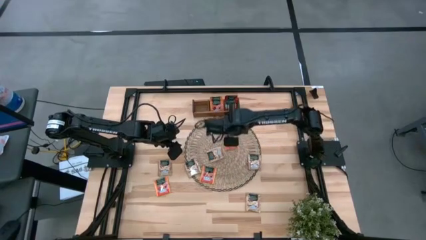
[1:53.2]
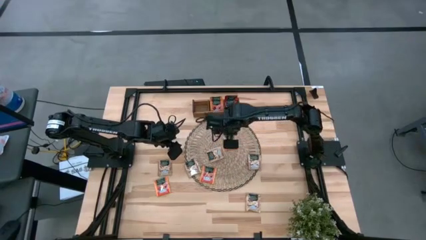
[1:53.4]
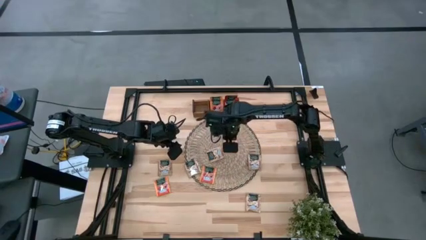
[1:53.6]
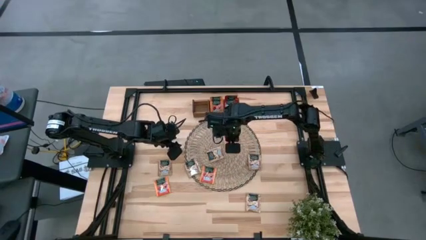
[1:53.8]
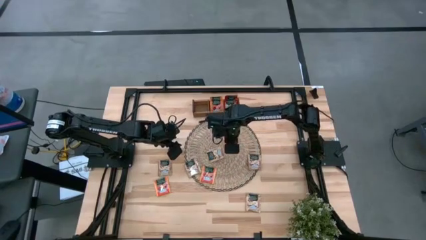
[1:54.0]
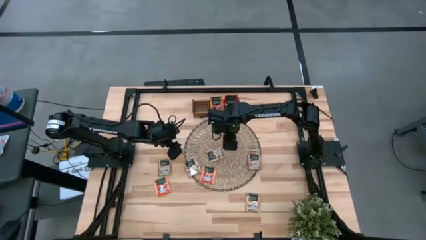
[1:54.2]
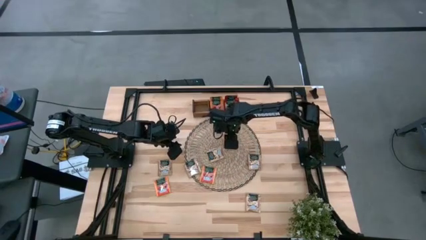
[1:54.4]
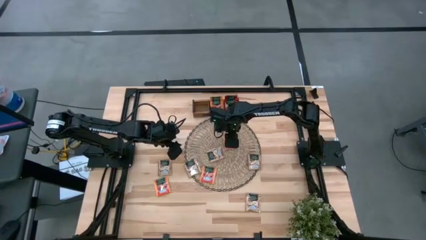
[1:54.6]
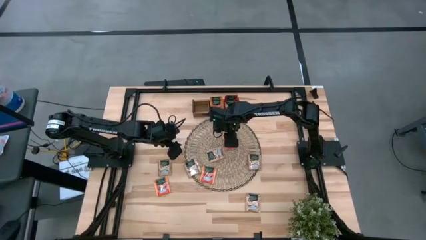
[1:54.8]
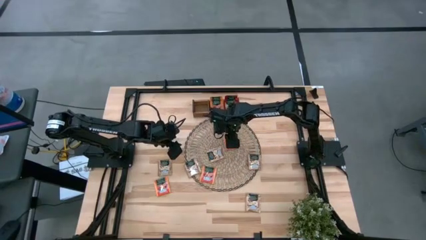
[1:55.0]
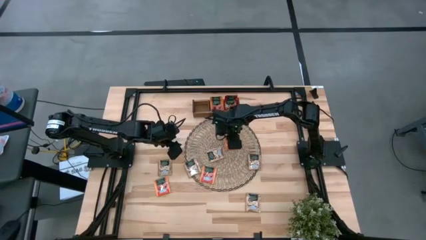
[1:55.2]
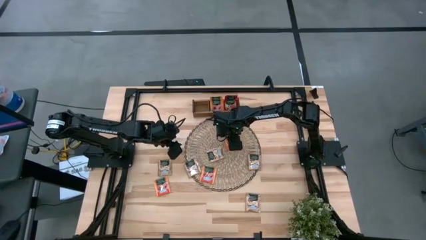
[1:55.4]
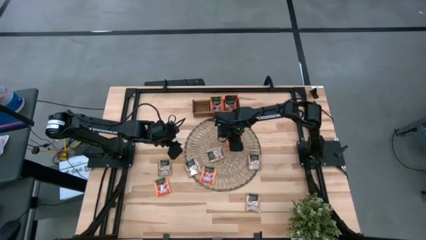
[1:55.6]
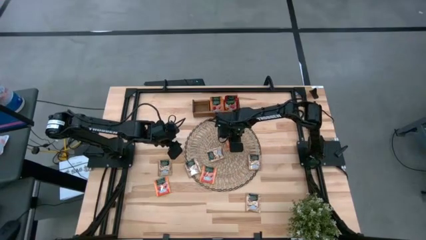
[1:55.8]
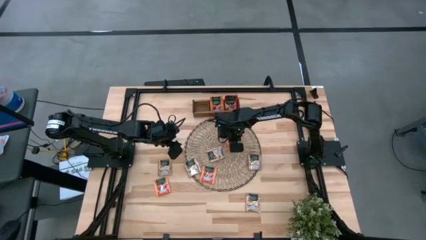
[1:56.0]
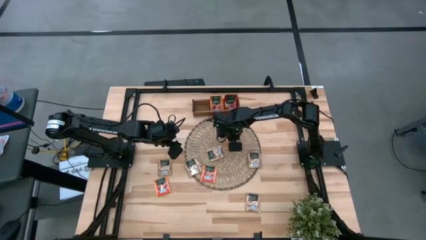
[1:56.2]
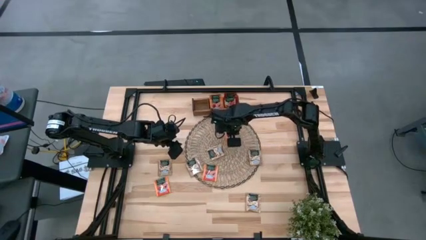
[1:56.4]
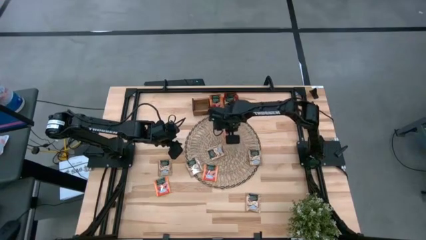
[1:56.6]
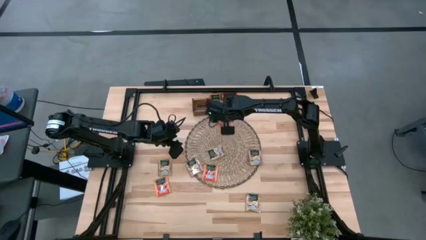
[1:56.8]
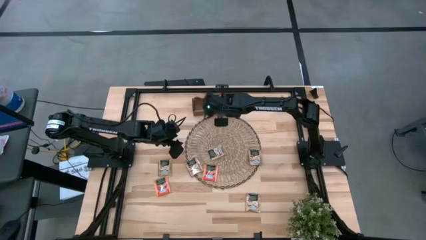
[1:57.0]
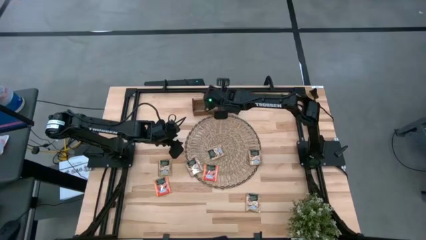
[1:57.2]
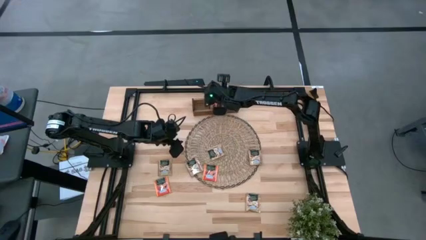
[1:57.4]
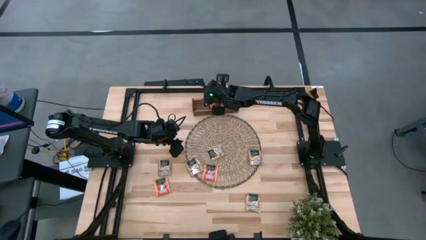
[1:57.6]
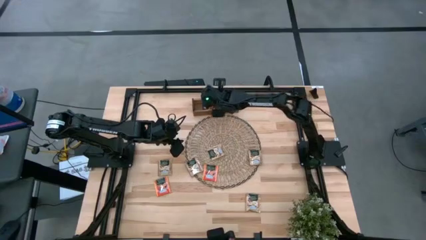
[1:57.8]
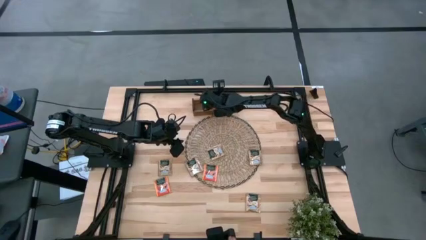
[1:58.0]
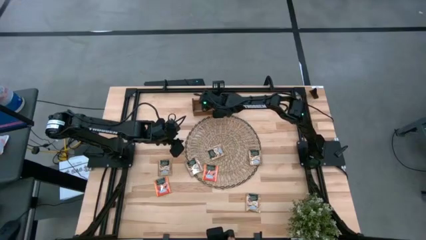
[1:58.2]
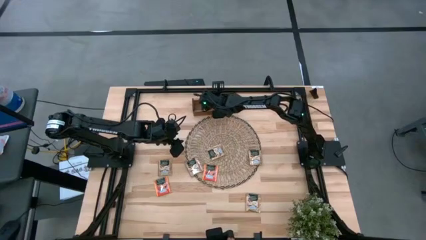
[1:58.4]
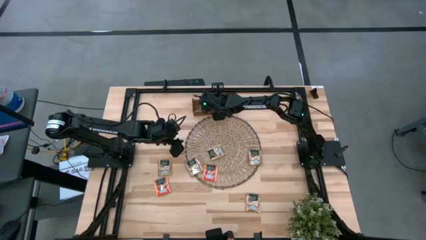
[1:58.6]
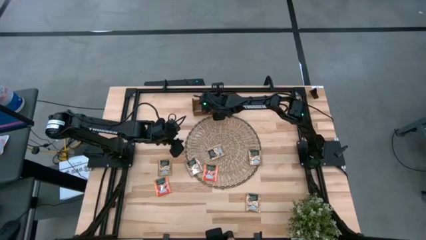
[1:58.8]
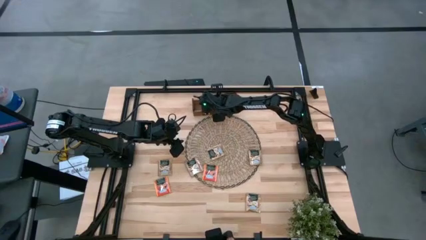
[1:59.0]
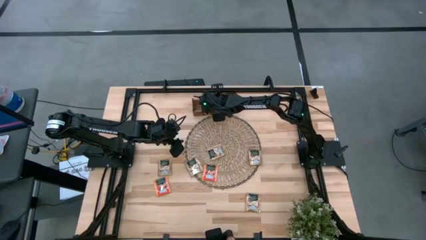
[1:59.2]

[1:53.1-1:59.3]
Task: Pick & Place Tea
Put the orange tea bag into the middle section of the wooden organizer

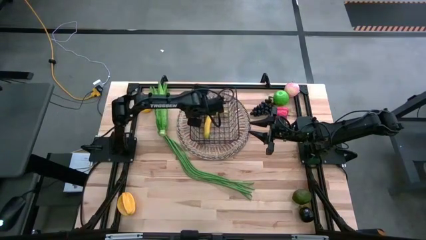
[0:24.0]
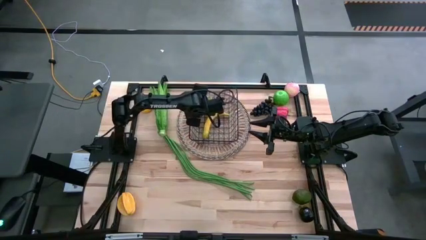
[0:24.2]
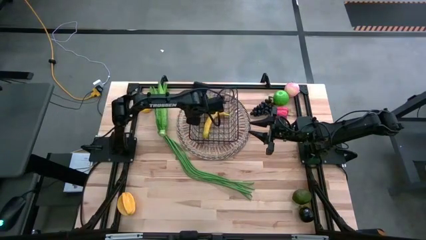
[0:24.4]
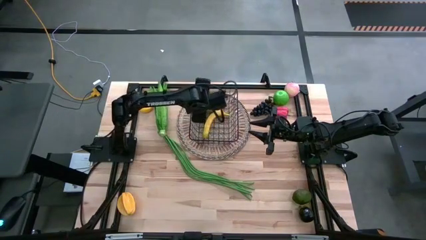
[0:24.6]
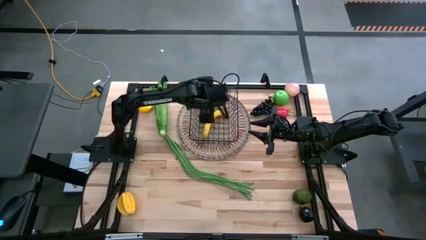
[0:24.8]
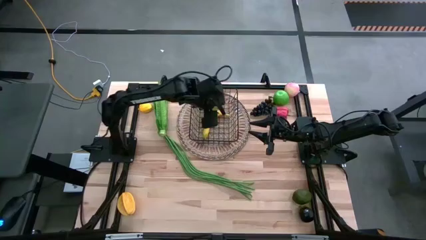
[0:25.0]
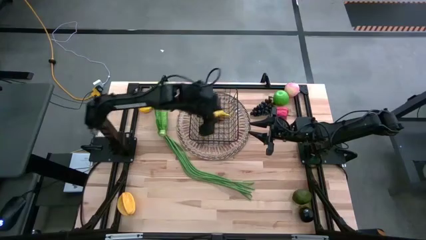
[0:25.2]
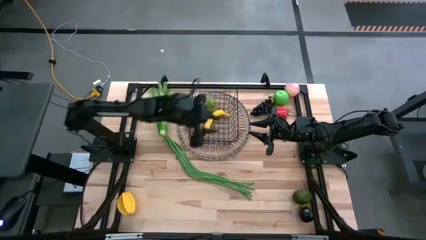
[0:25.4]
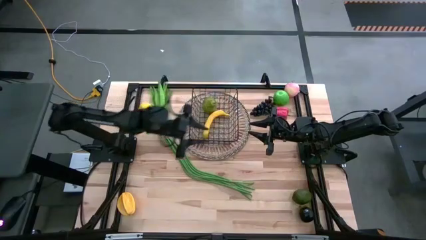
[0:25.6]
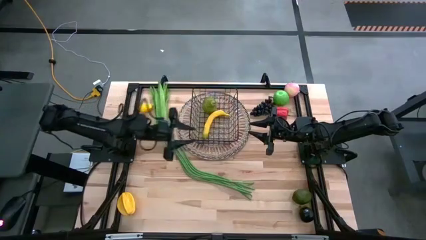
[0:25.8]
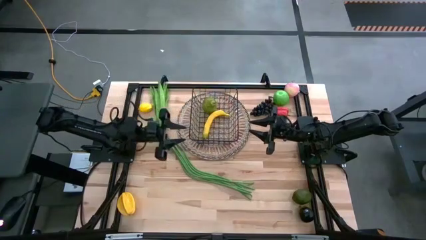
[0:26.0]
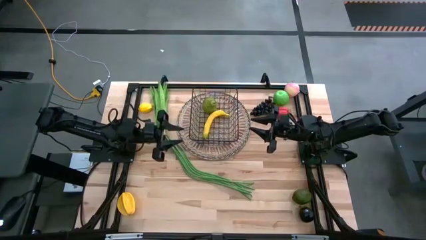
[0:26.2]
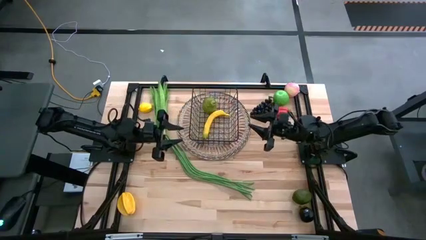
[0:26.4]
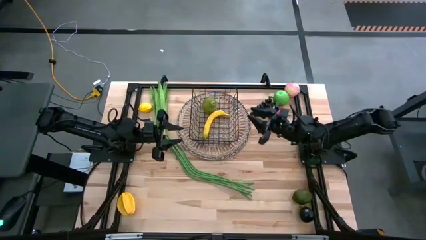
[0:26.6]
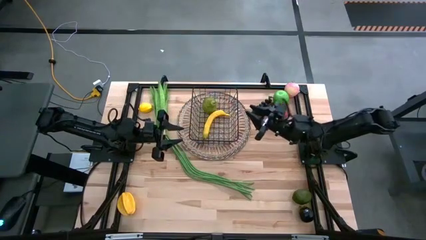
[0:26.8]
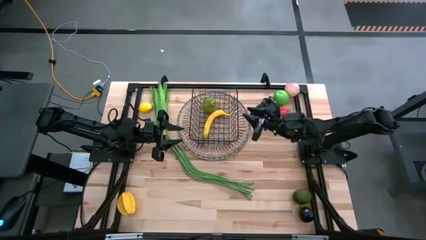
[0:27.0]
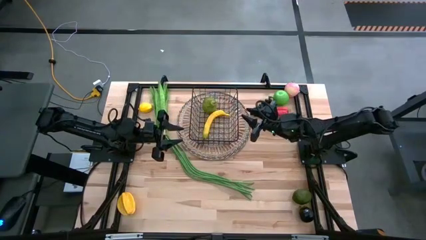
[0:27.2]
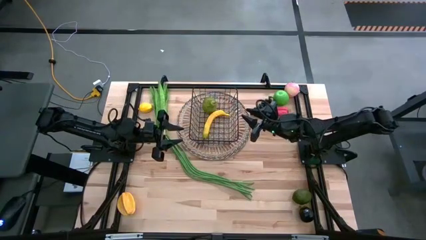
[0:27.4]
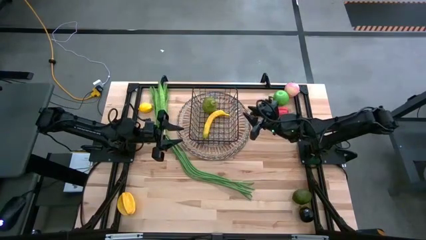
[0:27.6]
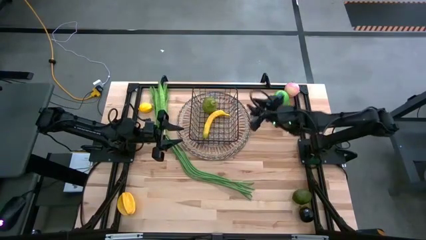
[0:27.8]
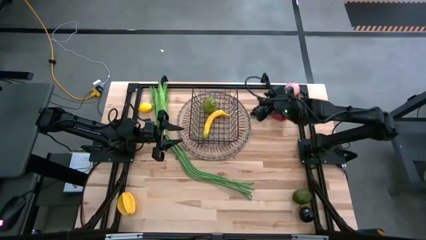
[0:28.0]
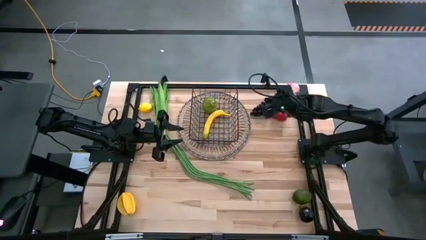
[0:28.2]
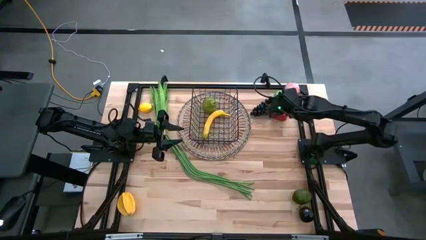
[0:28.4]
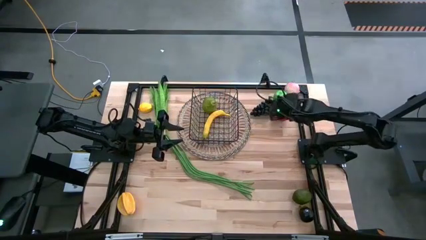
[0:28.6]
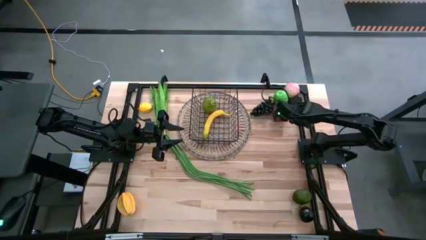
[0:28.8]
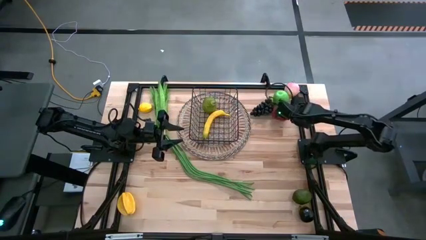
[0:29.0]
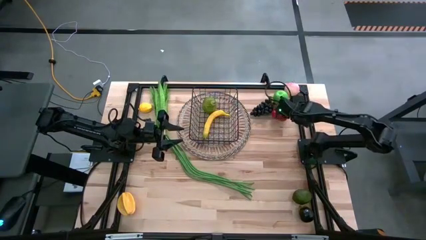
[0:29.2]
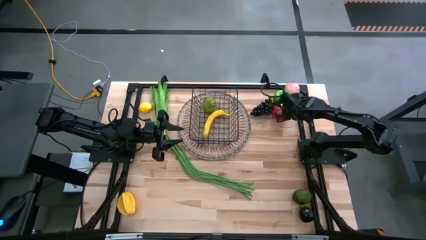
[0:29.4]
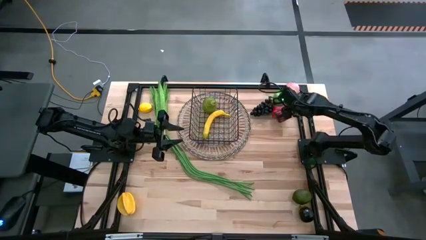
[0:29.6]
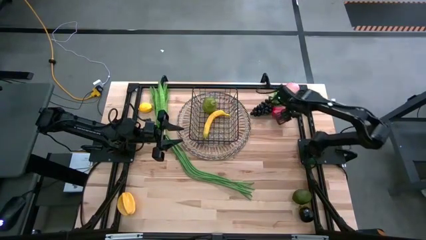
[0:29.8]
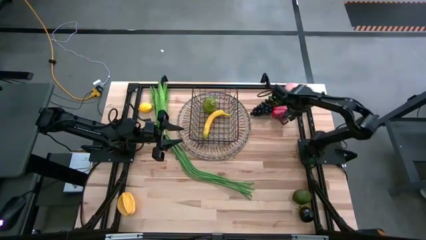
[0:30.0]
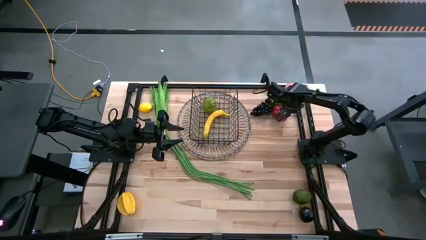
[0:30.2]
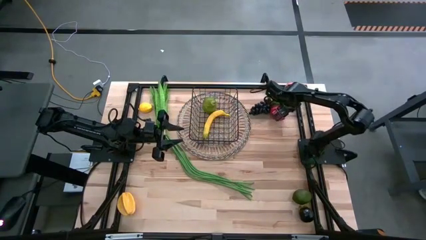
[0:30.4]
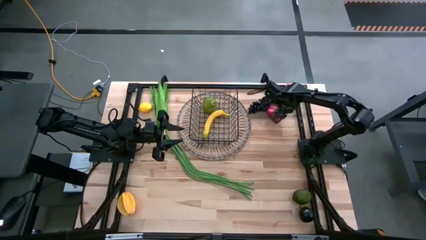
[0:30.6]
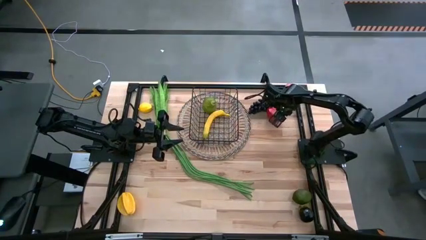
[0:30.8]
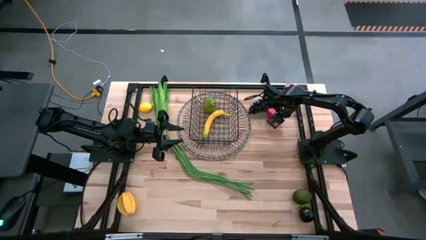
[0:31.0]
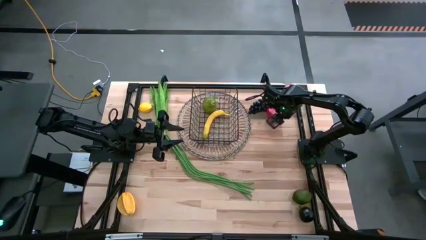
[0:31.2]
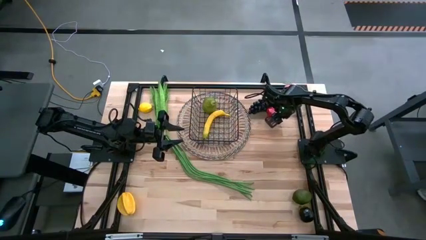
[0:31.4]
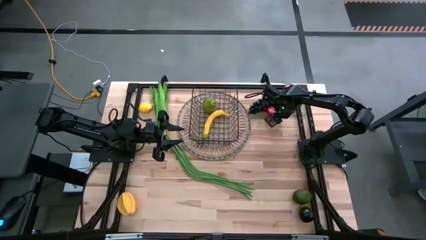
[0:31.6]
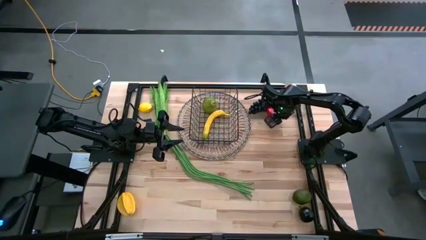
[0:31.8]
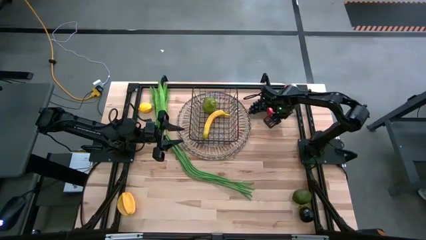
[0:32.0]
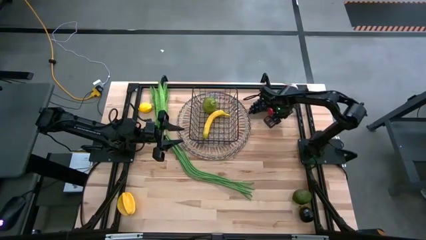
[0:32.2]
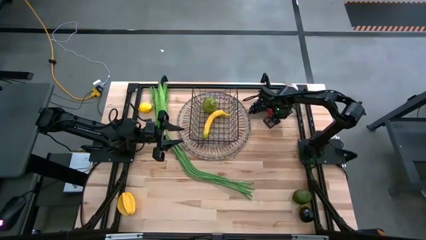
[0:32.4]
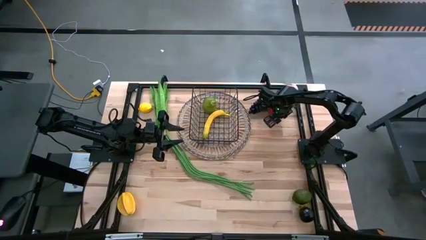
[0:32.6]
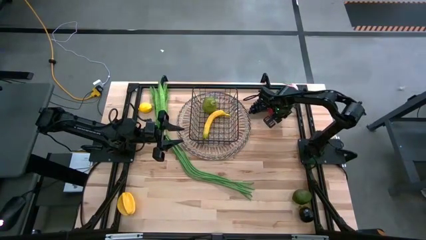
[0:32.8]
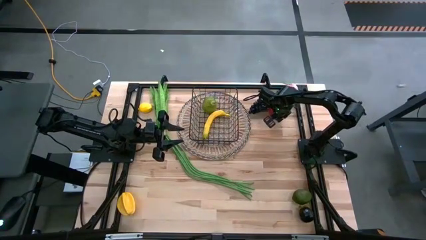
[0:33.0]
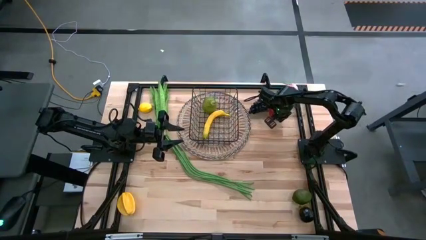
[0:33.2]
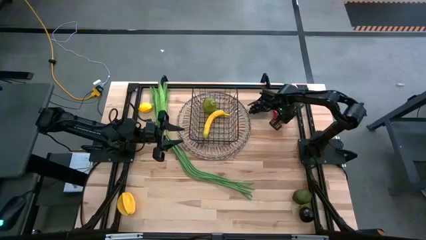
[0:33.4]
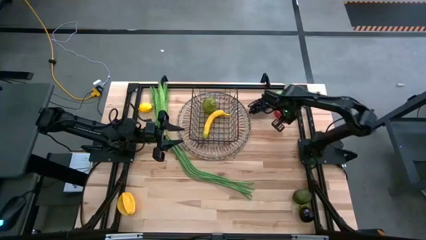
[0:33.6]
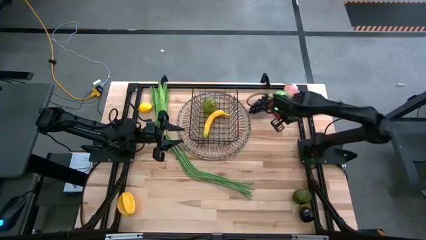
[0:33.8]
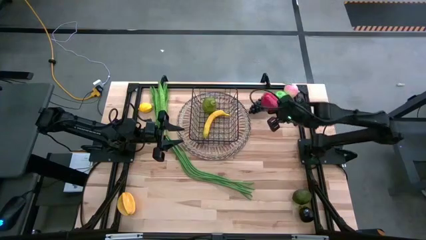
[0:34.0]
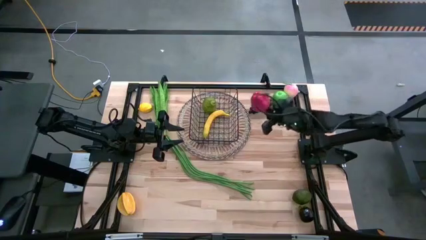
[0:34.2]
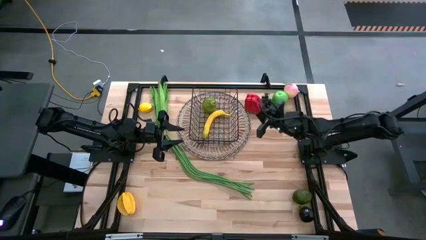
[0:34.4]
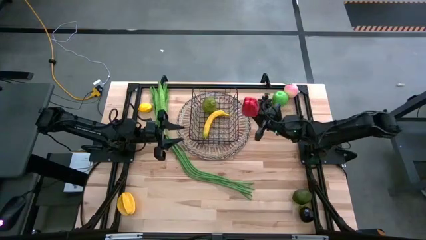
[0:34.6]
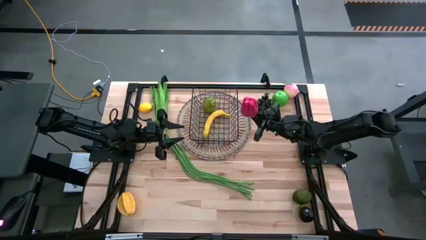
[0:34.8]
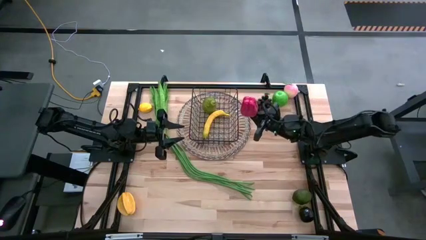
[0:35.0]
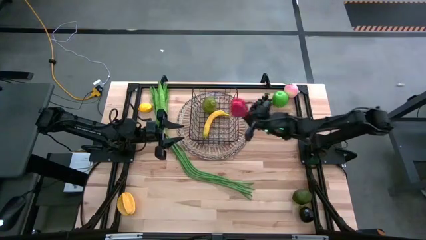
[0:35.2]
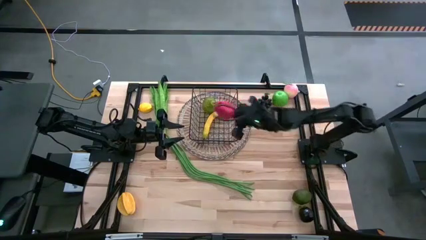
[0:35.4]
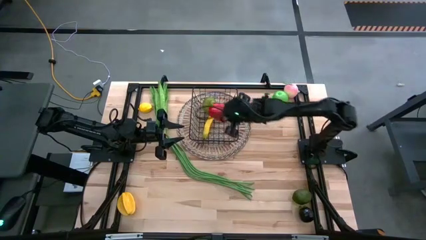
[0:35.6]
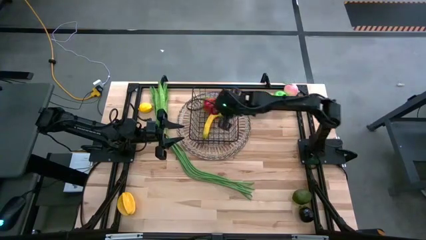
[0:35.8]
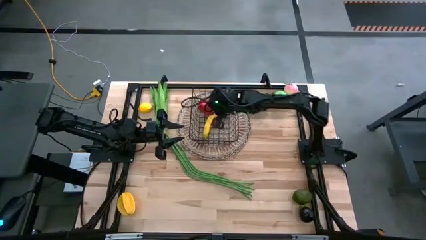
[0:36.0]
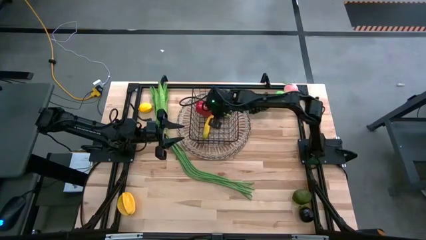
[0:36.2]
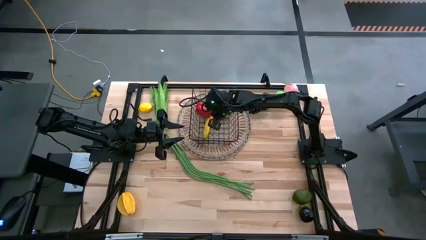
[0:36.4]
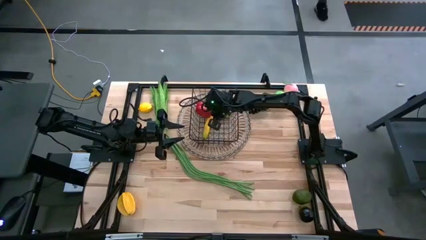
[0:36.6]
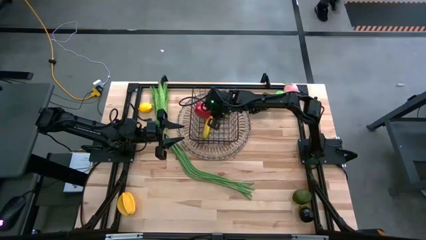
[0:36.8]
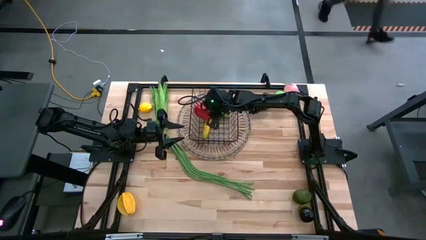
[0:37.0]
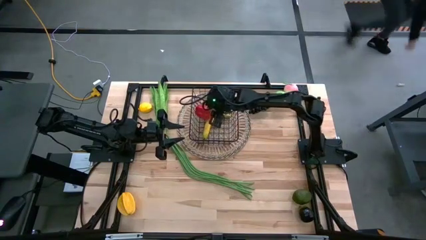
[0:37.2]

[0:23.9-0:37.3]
Task: Build produce basket
Put the red bell pepper into the black mesh basket
